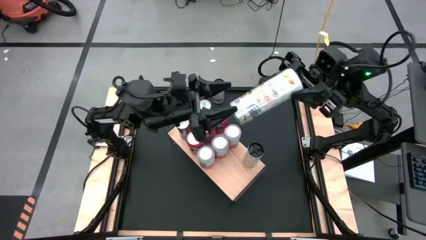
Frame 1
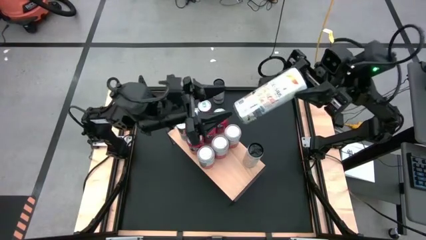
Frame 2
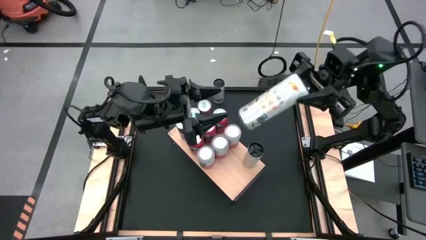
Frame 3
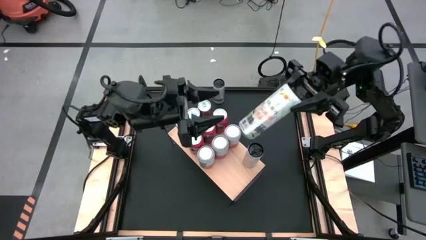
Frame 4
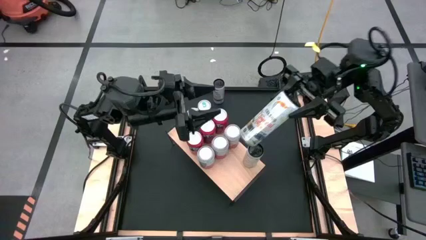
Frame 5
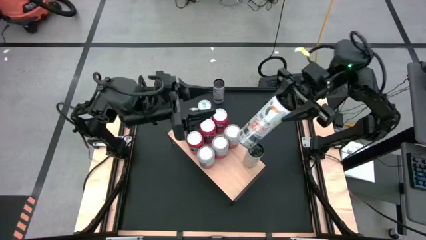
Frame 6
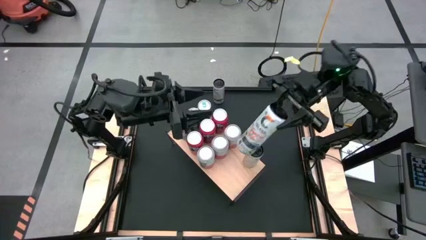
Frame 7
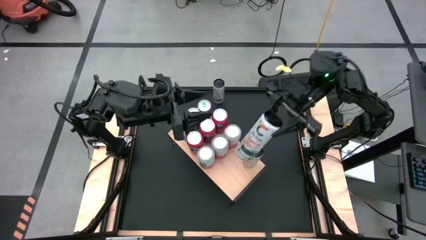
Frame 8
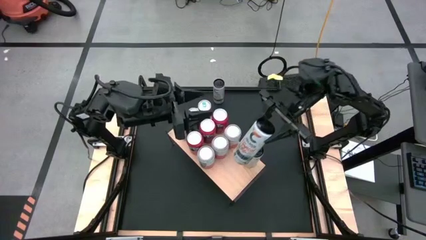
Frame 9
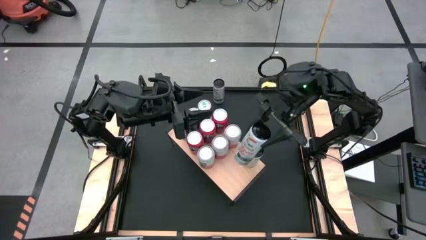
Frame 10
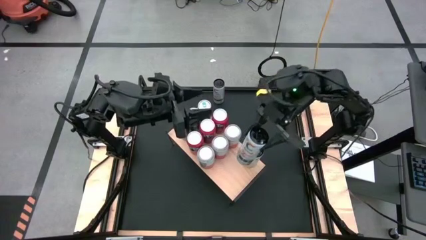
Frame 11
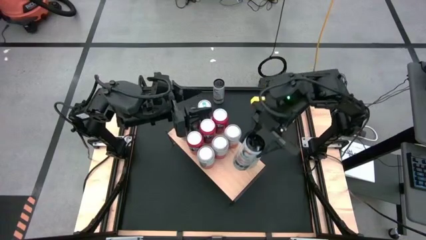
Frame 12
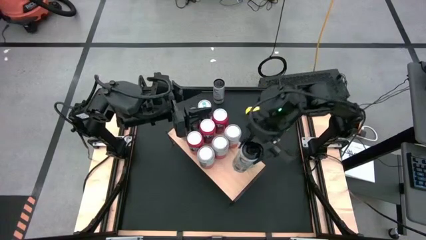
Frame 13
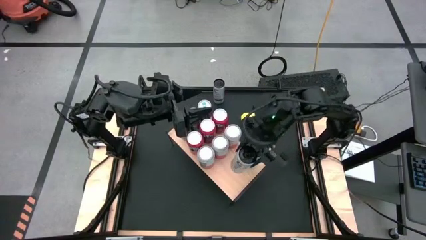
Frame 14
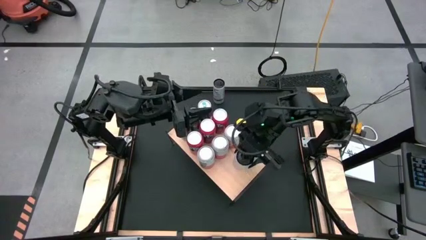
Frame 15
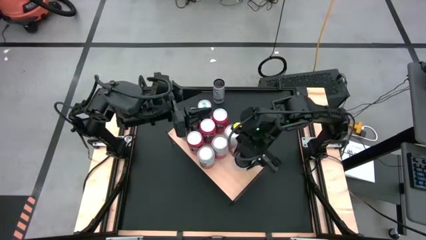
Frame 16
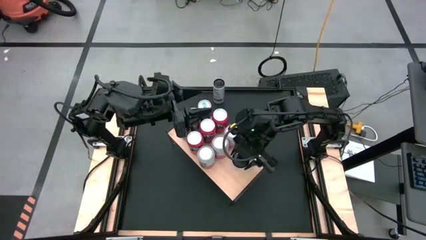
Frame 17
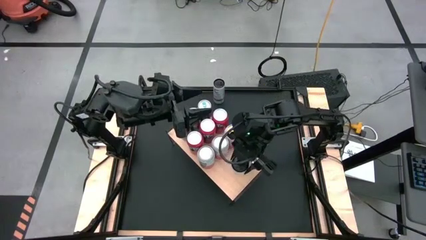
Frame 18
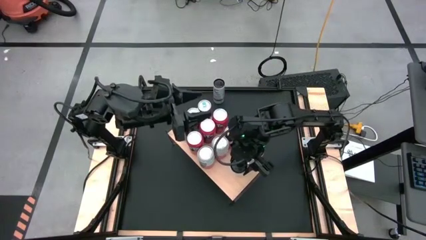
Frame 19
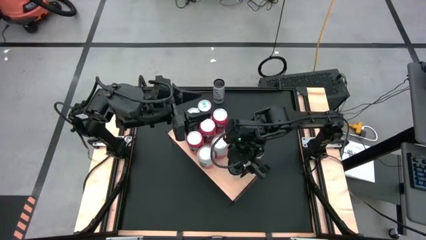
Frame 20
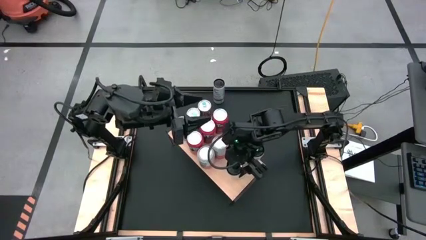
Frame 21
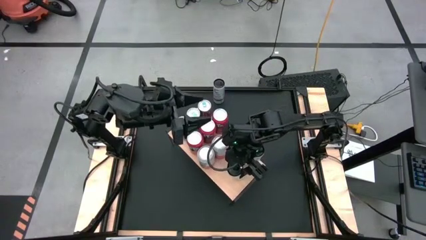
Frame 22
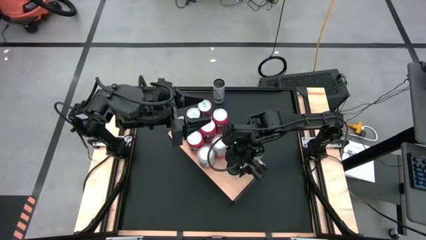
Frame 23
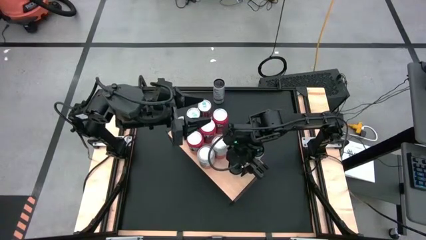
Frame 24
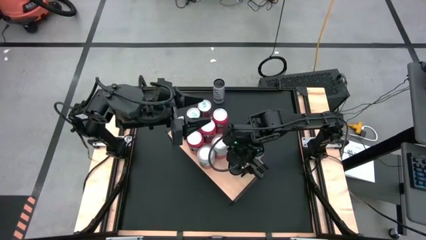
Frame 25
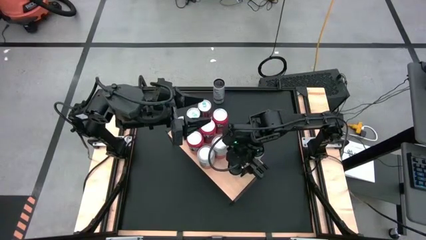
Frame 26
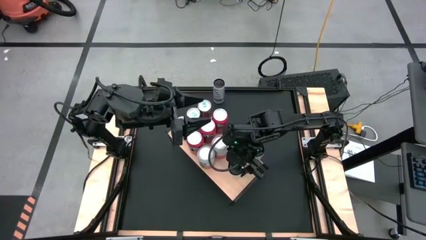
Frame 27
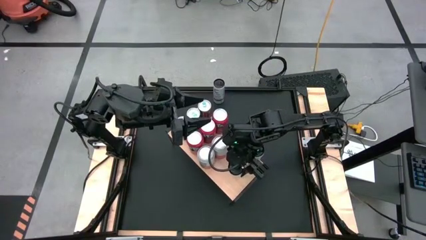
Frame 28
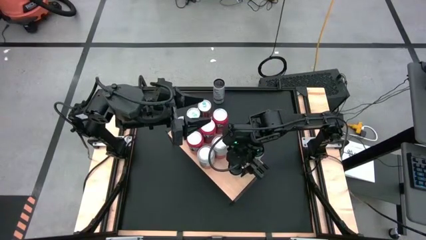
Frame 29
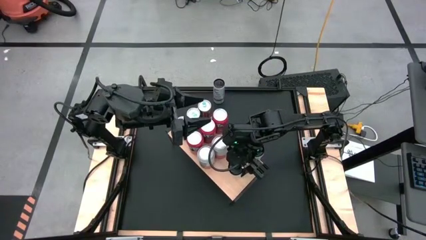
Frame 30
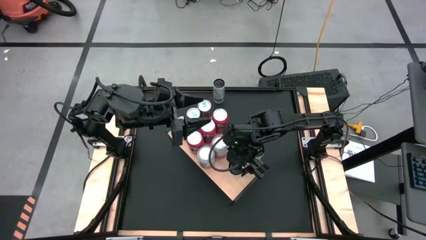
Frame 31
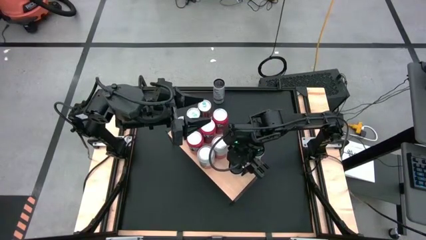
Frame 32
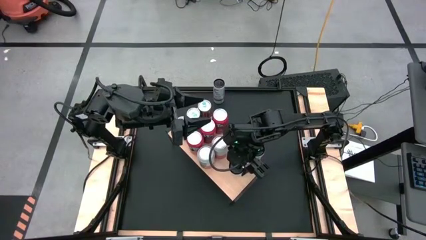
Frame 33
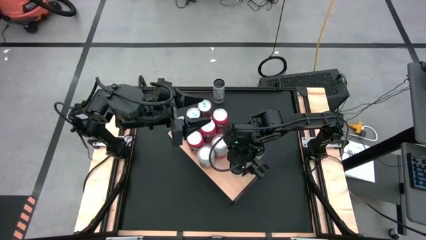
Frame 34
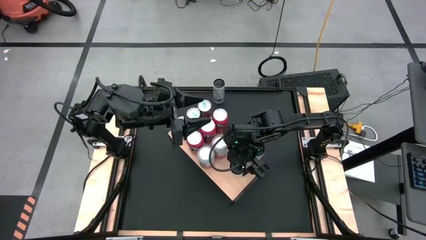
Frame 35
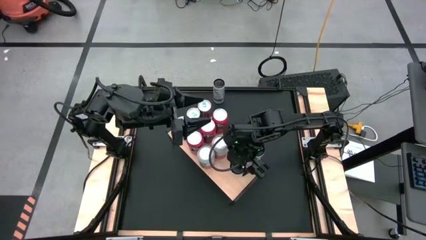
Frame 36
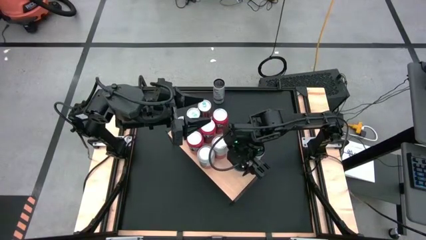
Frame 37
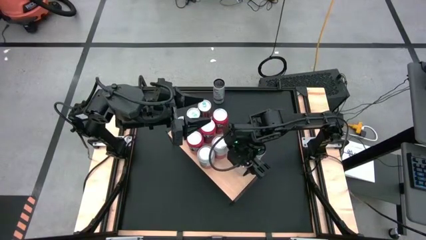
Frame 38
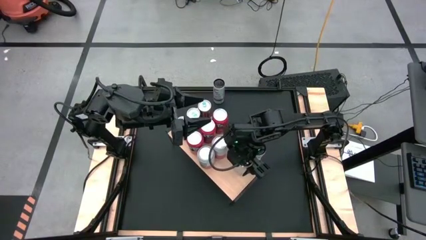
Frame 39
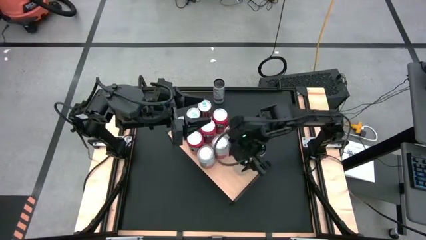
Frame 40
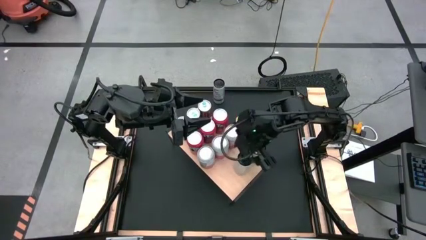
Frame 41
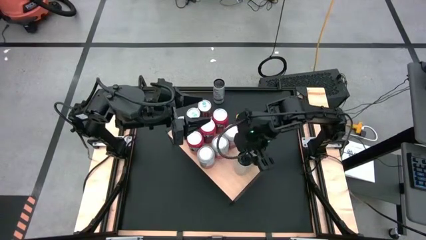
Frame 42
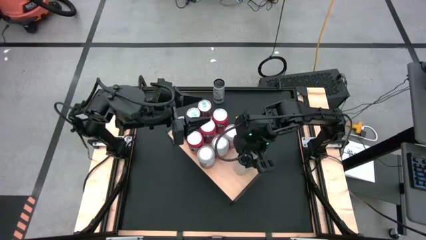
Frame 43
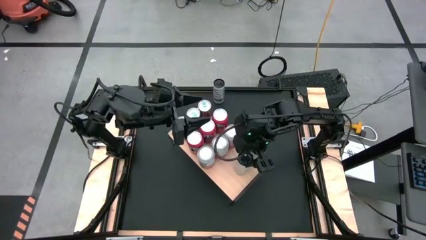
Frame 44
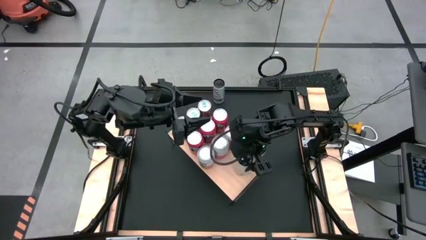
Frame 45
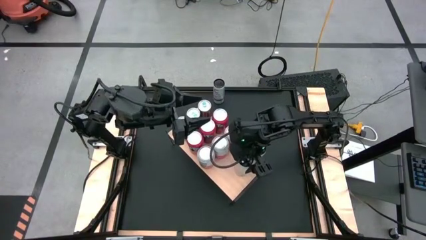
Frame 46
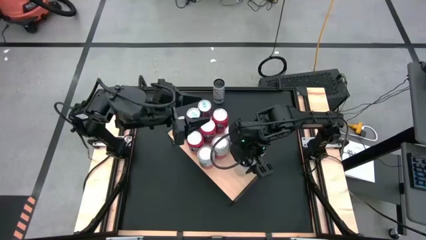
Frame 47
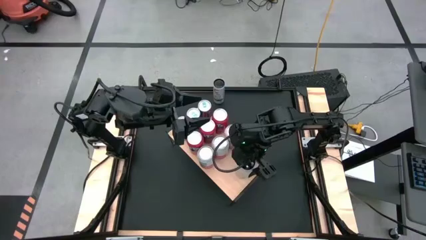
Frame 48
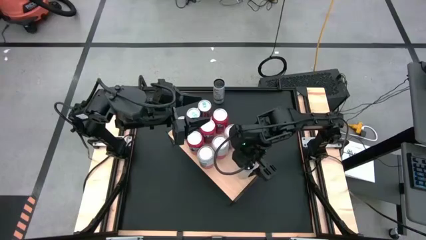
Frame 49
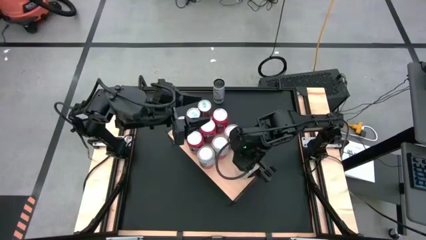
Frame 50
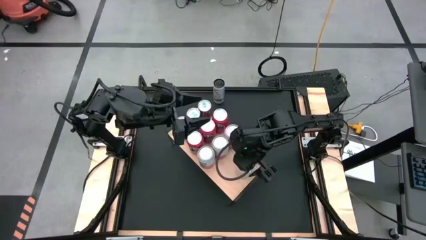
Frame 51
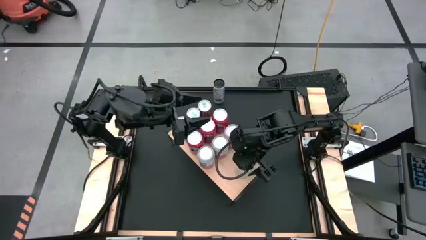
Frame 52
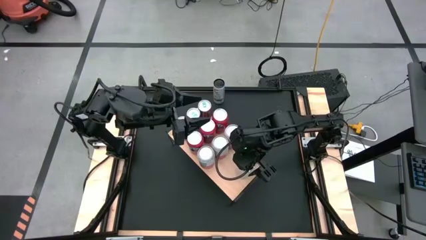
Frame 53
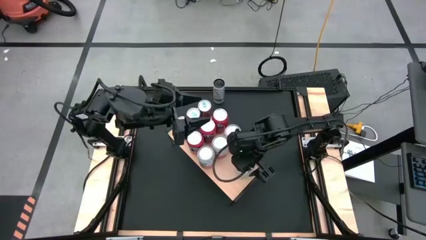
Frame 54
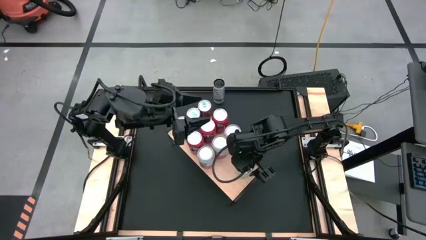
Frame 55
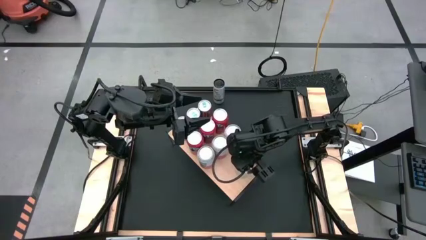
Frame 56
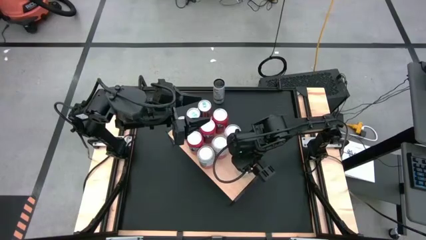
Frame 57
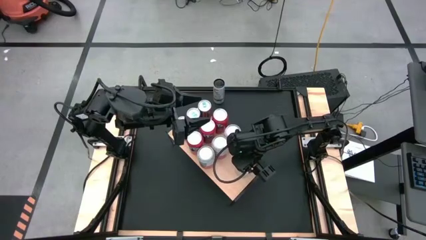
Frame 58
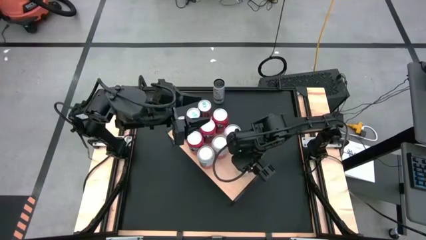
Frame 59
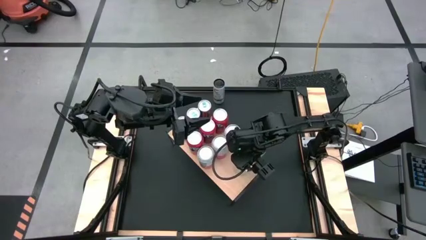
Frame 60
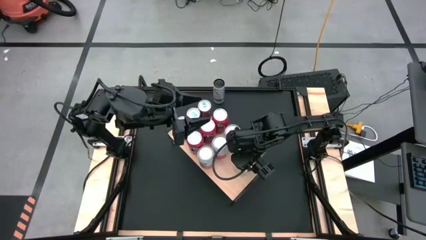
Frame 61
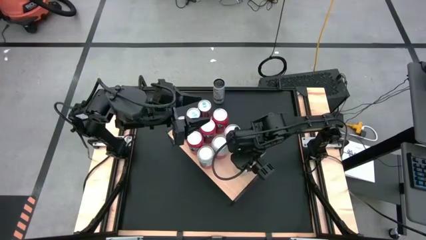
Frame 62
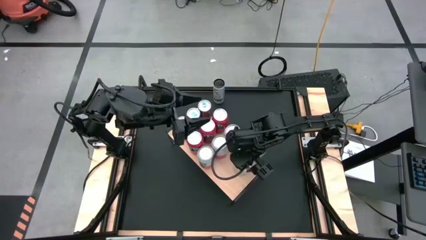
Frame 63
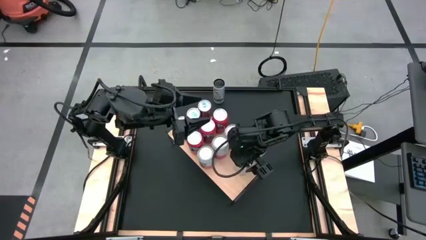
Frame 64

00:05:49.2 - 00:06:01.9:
Task: Place canned beverage on shelf
Put the bottom white soda can on the shelf aligned with the other white soda can

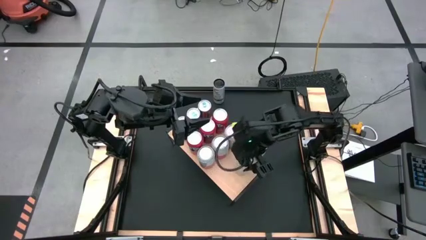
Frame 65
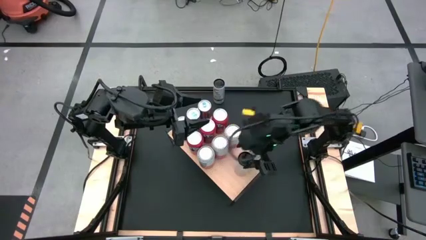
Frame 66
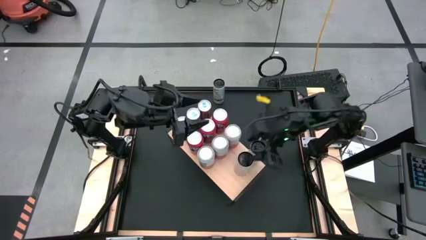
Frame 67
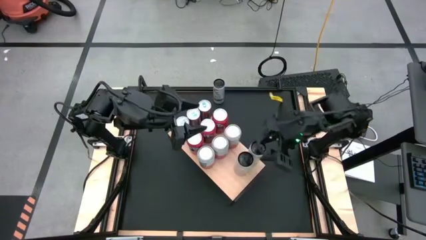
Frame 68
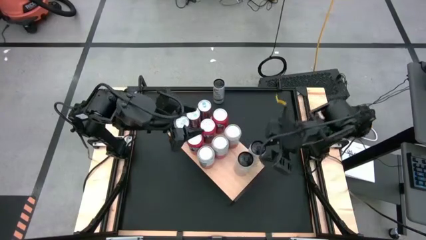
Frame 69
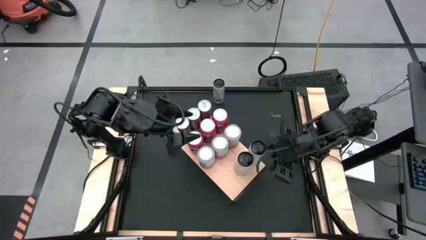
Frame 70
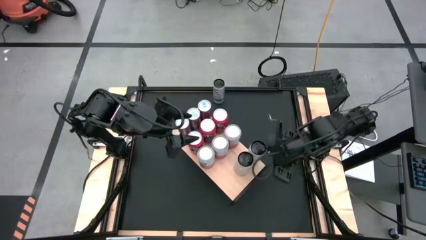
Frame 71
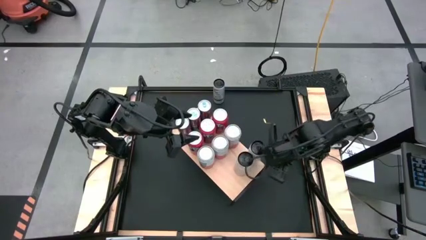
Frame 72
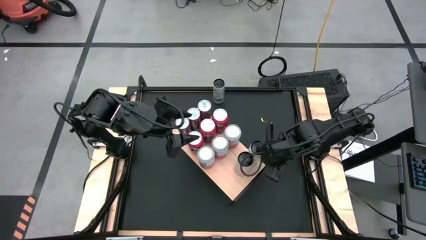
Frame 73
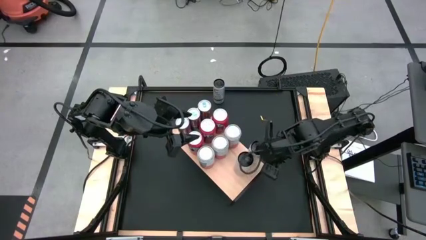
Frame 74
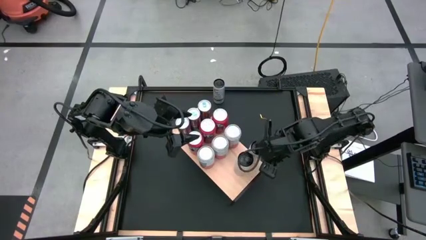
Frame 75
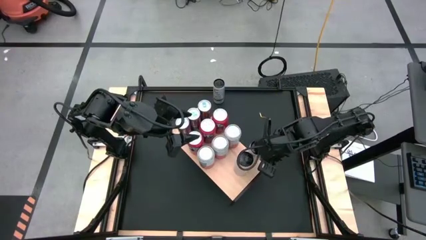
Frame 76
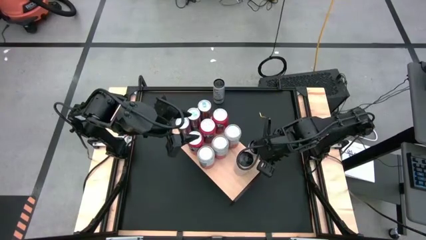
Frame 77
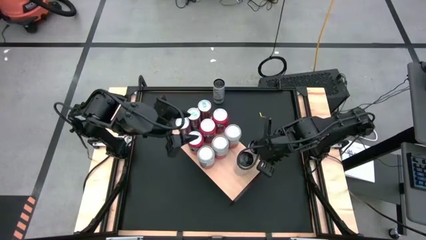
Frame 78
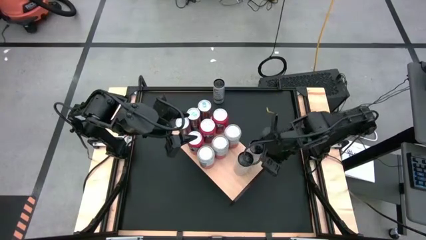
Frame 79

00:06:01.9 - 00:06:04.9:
Adjust the white soda can on the shelf
